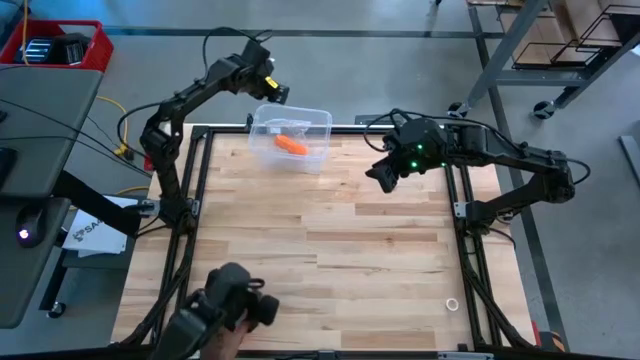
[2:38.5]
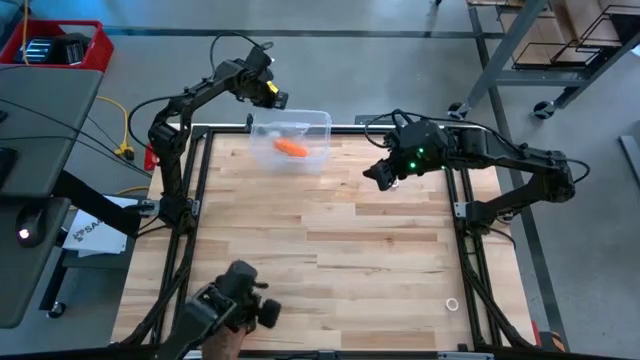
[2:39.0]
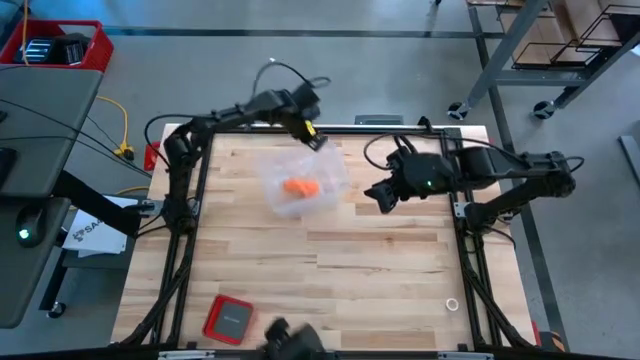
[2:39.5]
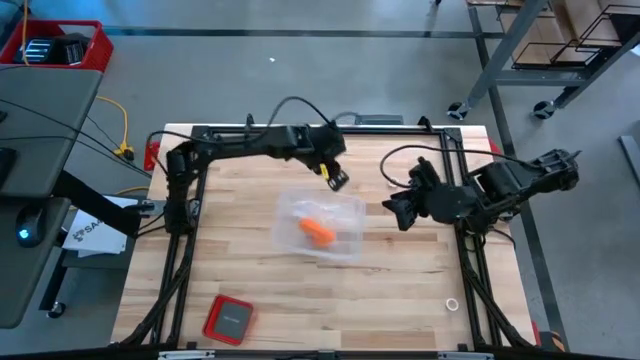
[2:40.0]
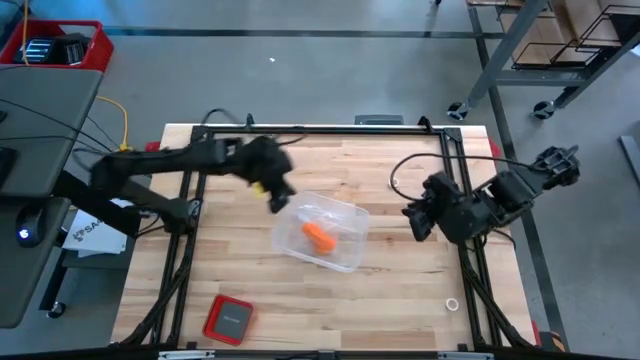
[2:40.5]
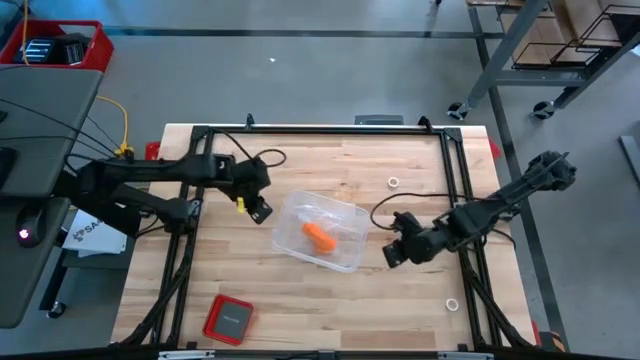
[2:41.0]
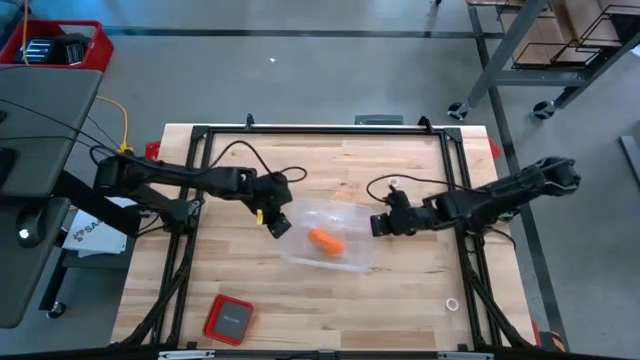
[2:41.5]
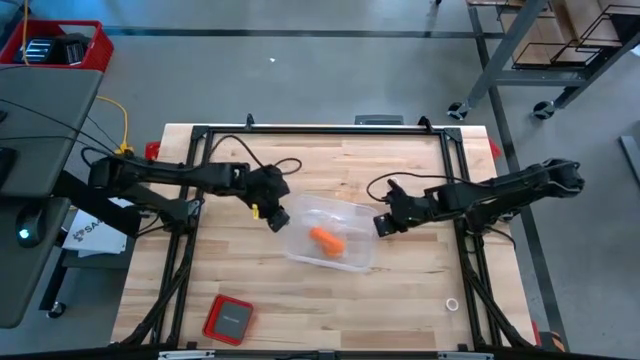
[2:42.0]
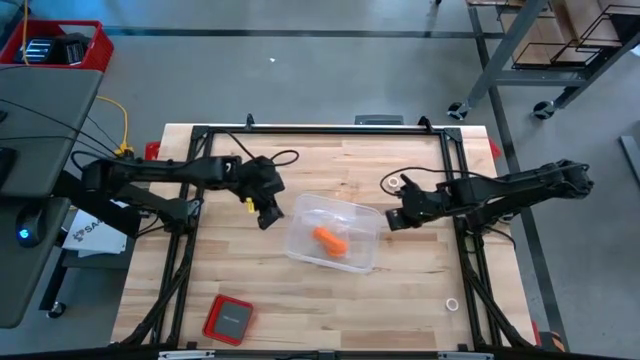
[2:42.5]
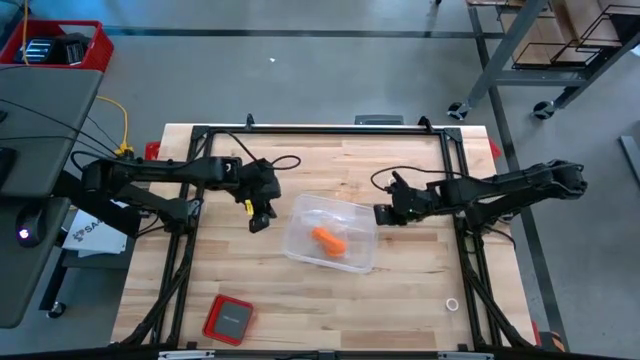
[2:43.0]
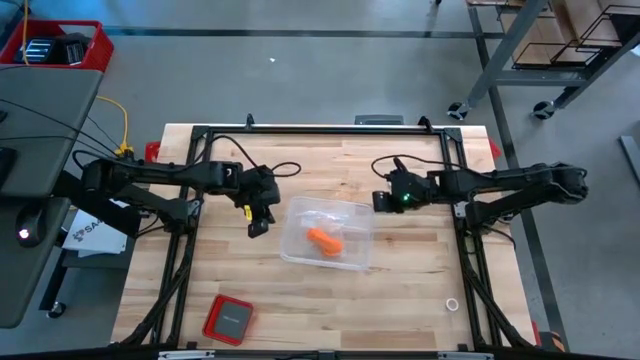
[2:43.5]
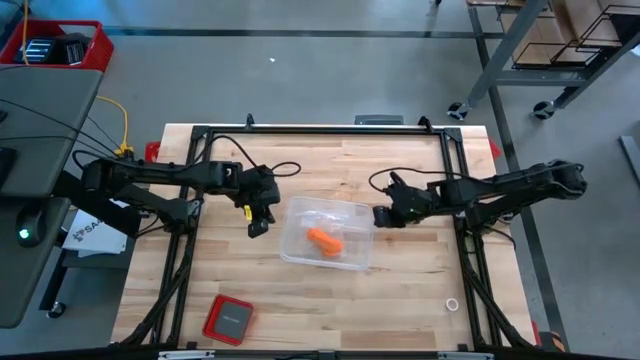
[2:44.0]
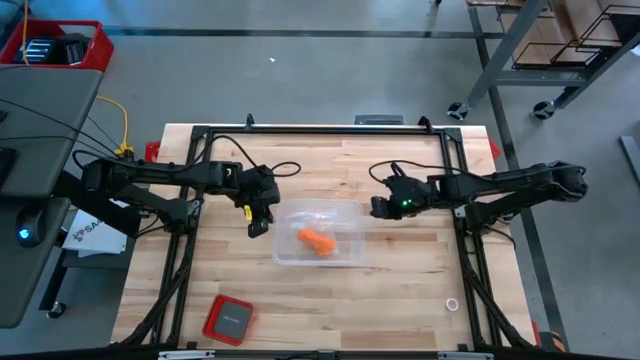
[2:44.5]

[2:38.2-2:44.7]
Task: Roll bandage
Adjust the transparent bin to the center of the table

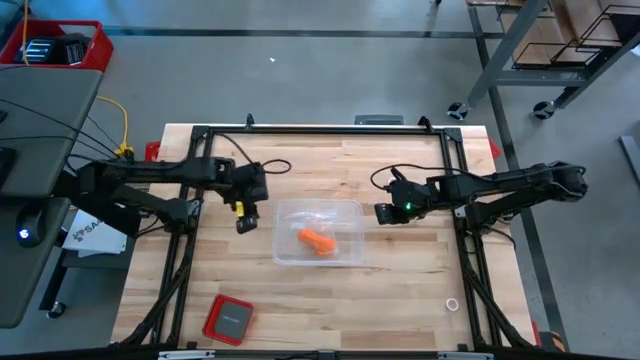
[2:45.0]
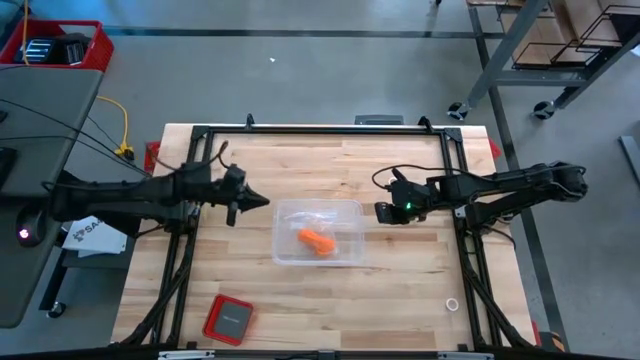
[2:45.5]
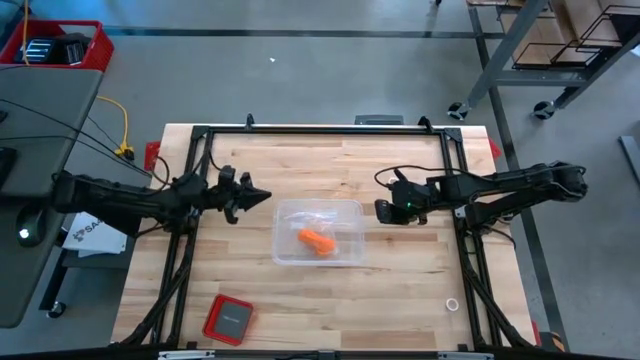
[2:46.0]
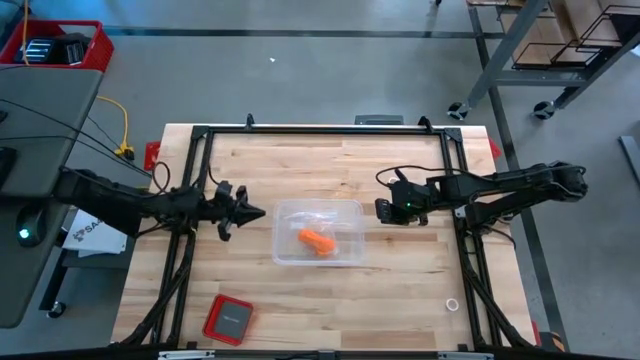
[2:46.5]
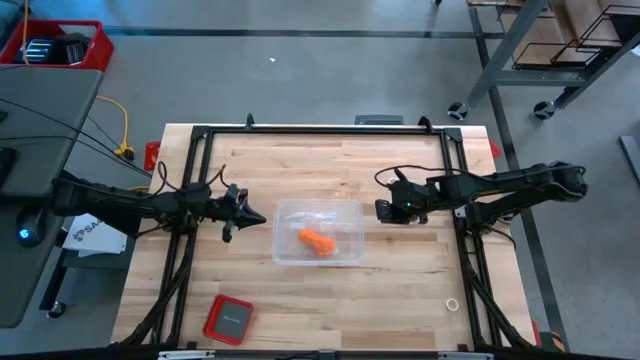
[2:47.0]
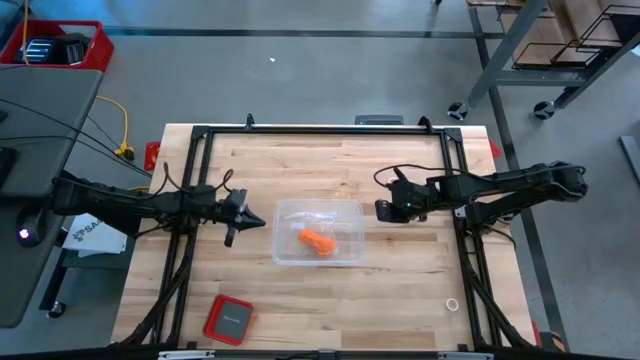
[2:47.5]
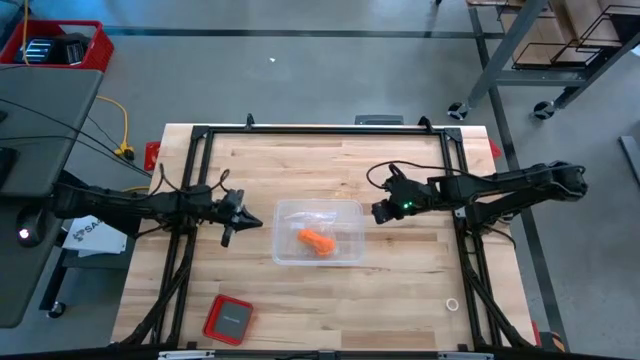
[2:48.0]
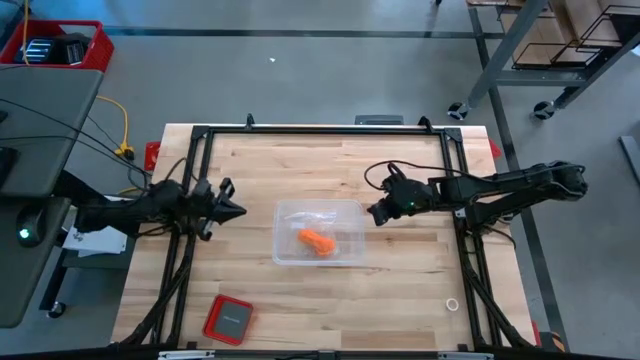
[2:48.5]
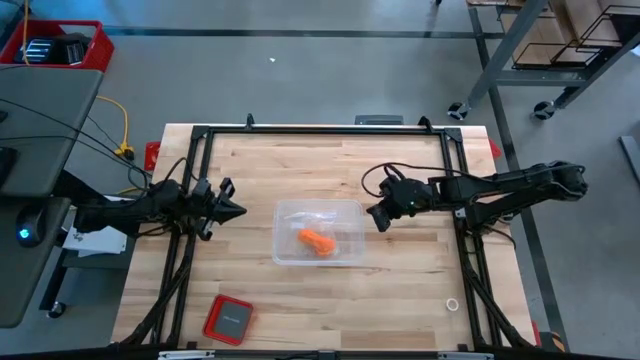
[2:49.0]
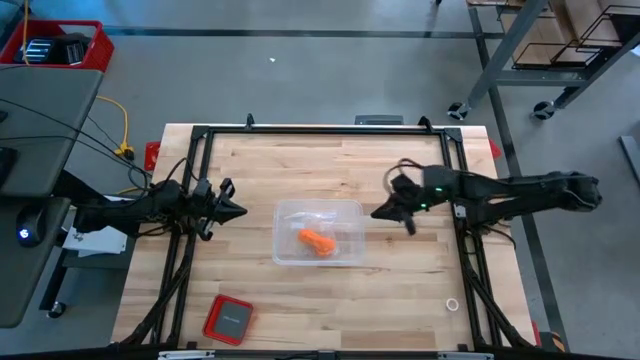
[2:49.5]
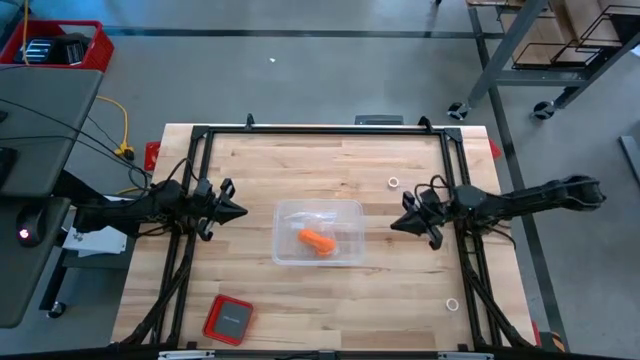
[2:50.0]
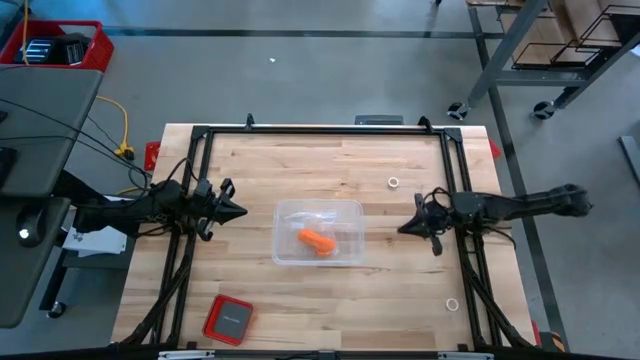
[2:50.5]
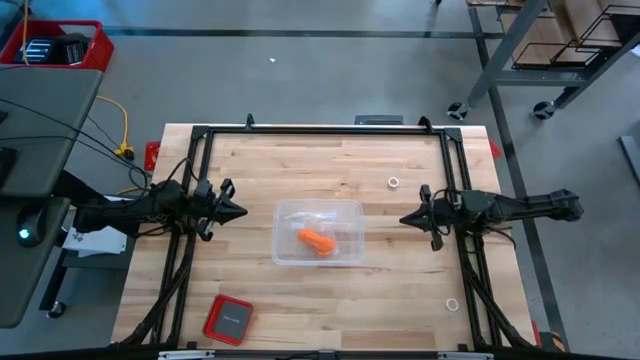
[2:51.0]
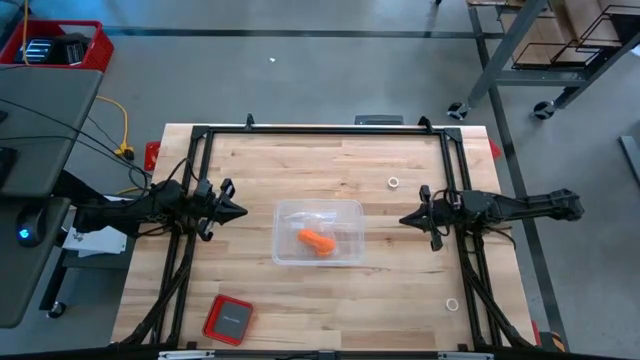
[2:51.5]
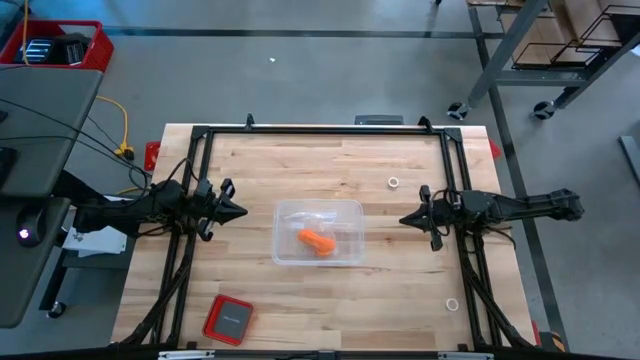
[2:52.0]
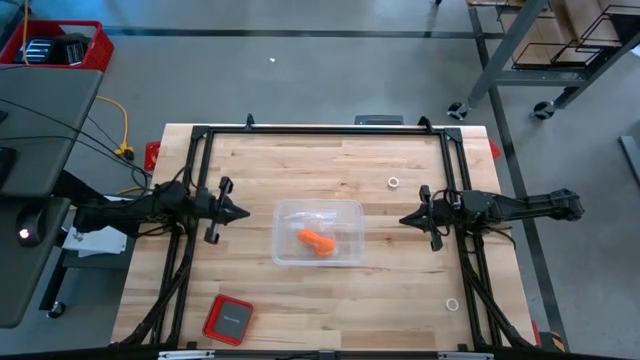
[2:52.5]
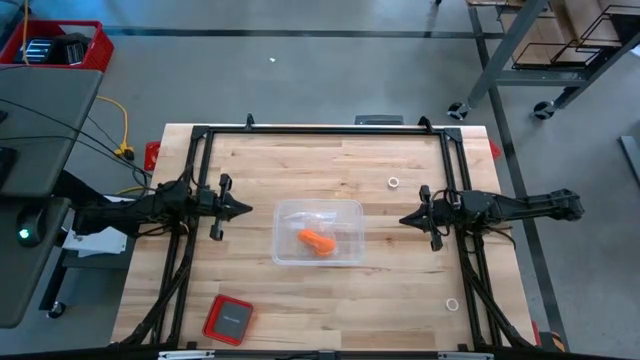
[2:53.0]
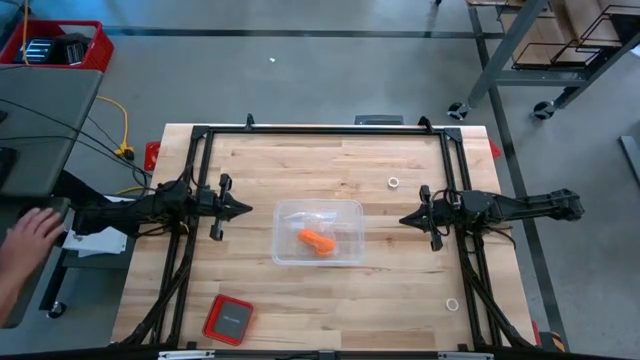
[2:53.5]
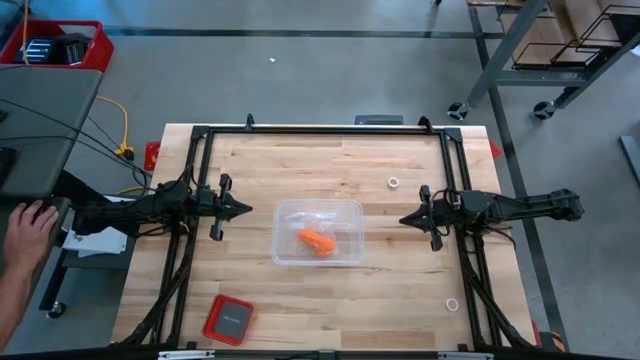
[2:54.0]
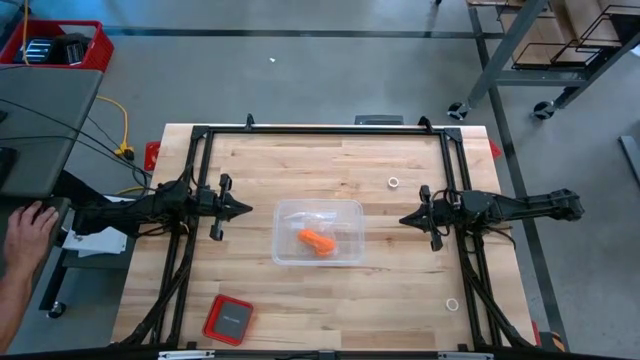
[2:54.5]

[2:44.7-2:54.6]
Return to Home Position

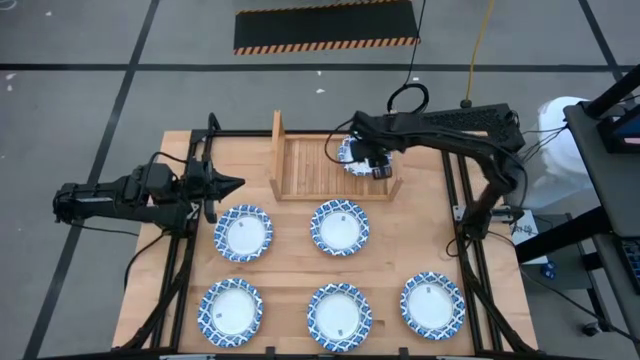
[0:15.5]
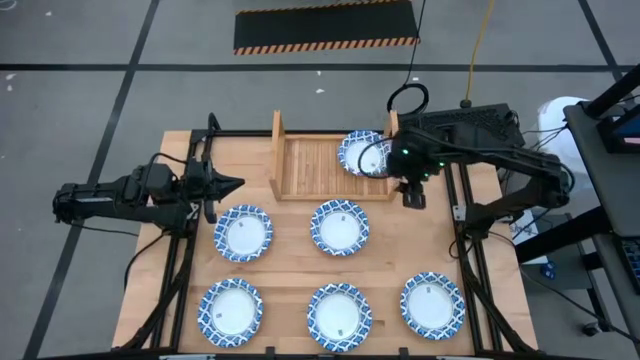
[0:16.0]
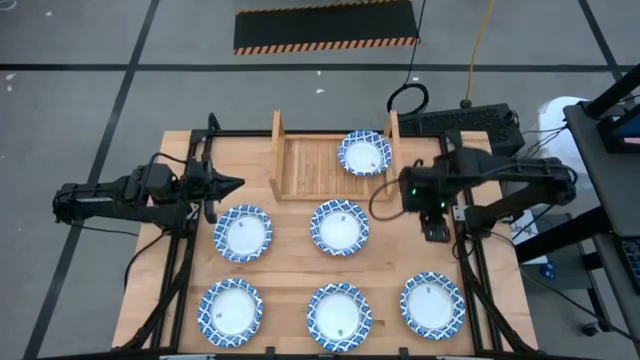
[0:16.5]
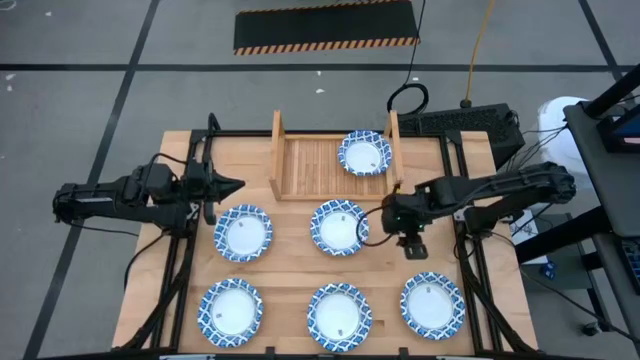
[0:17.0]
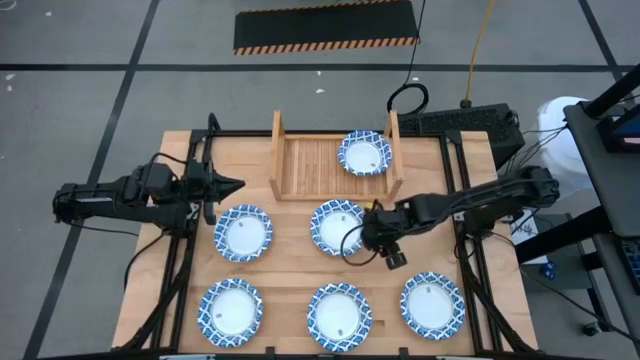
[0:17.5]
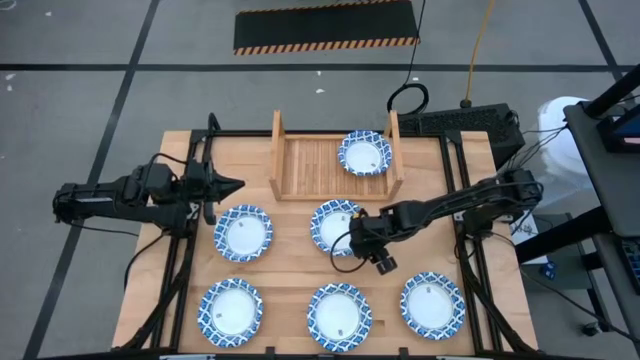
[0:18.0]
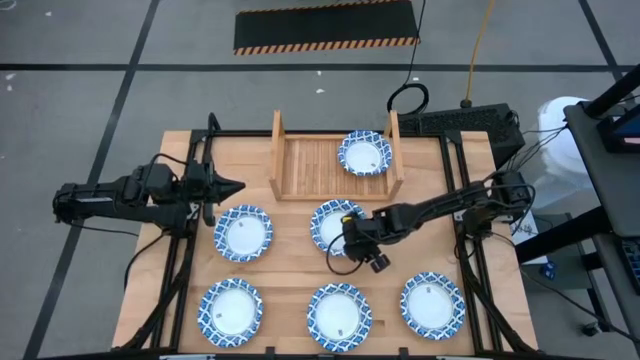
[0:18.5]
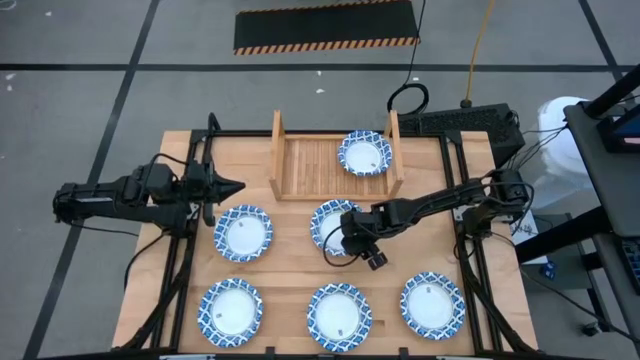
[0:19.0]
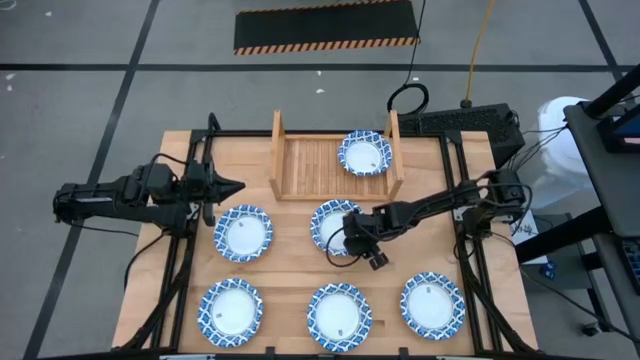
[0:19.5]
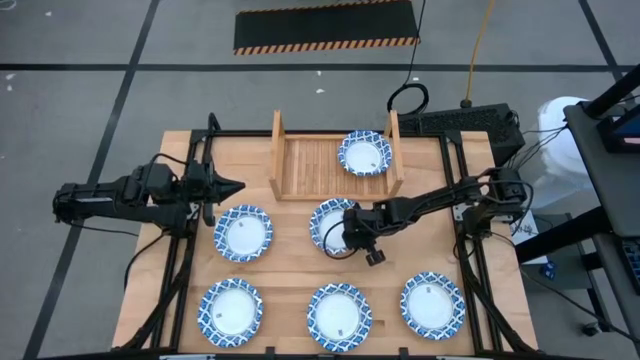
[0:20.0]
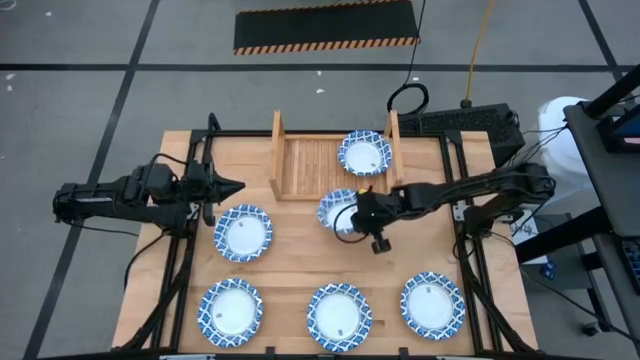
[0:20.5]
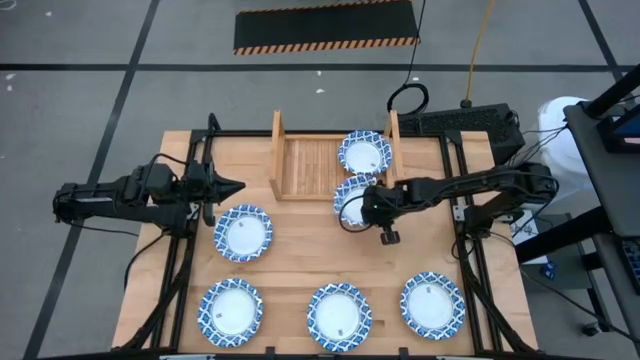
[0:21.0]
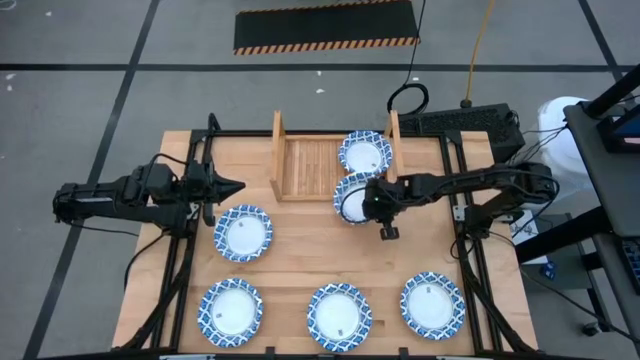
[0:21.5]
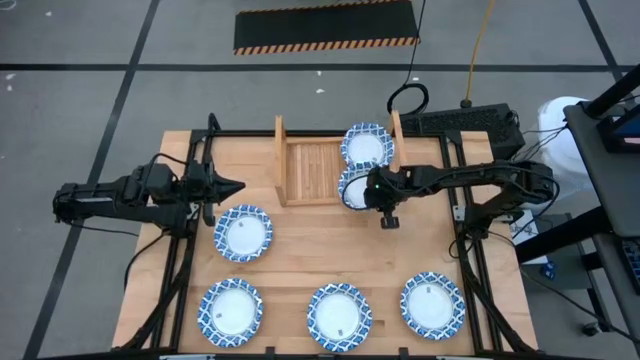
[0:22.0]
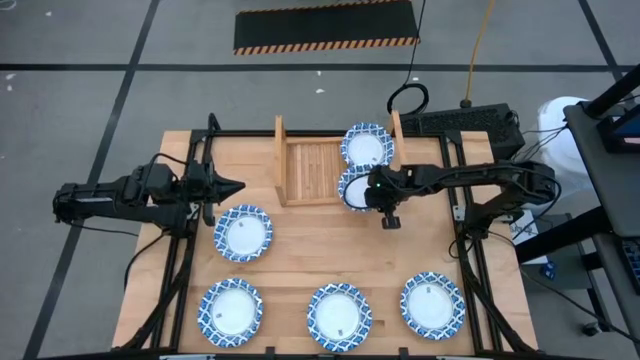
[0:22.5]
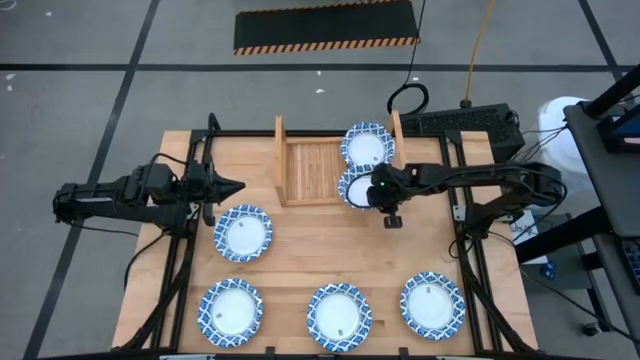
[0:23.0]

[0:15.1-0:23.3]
Task: Place and stack bowls onto a shelf
Put the blue patterned bowl on the shelf
